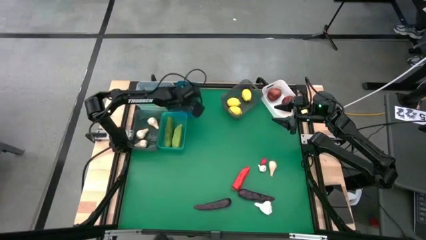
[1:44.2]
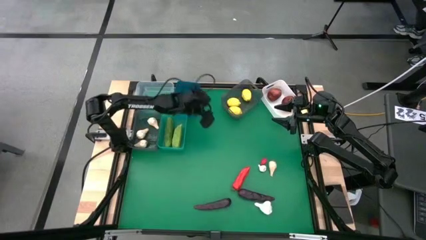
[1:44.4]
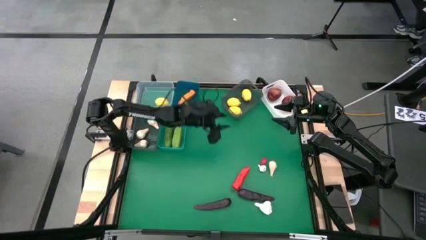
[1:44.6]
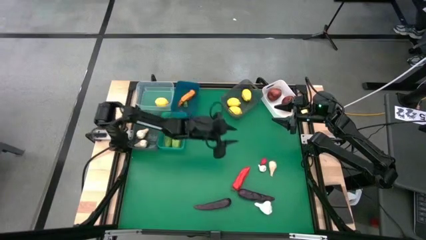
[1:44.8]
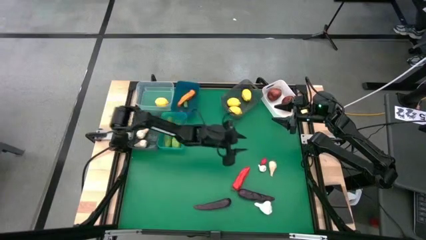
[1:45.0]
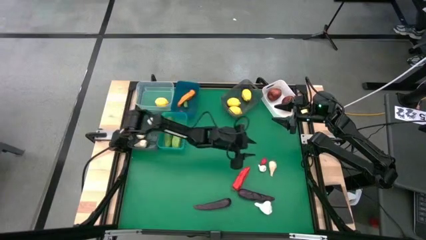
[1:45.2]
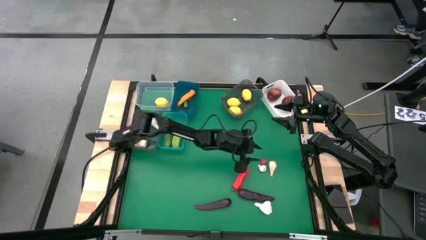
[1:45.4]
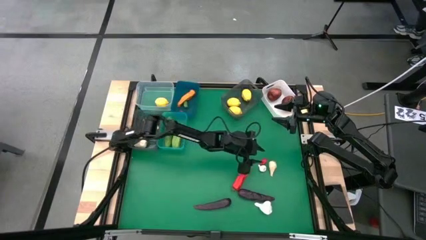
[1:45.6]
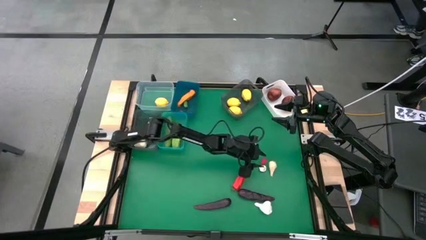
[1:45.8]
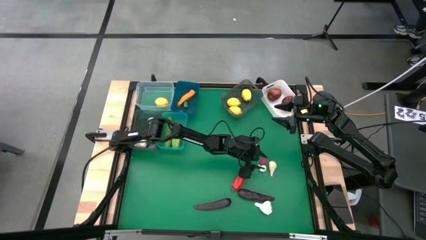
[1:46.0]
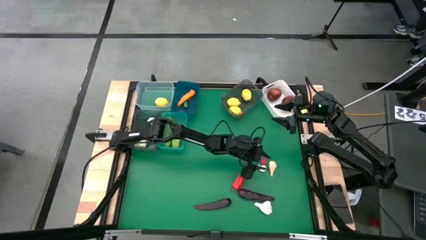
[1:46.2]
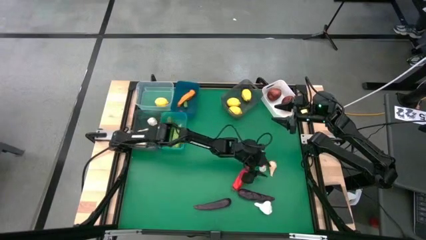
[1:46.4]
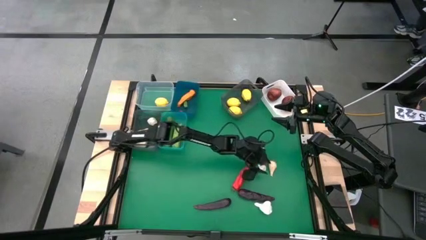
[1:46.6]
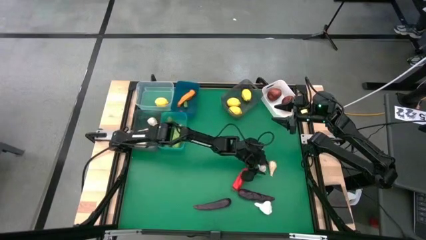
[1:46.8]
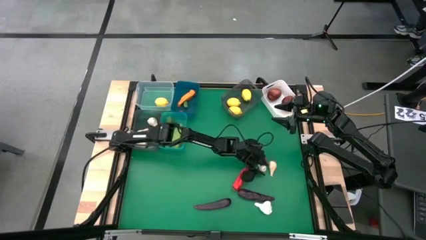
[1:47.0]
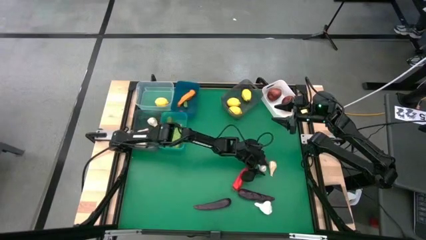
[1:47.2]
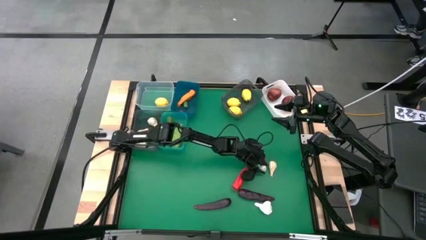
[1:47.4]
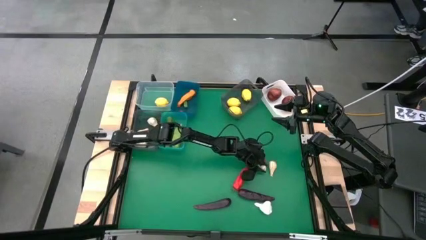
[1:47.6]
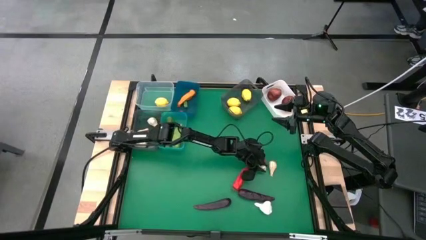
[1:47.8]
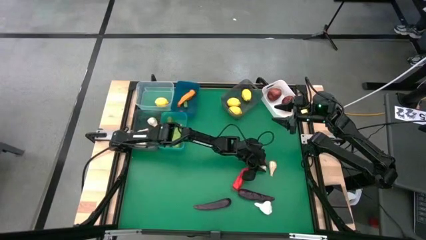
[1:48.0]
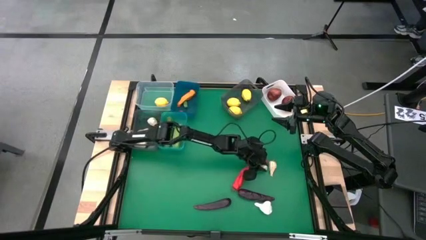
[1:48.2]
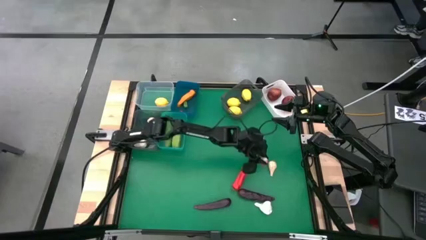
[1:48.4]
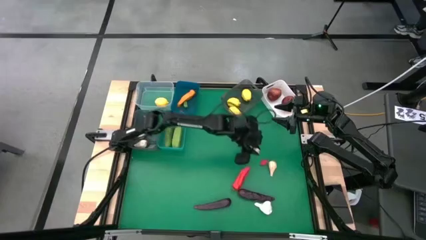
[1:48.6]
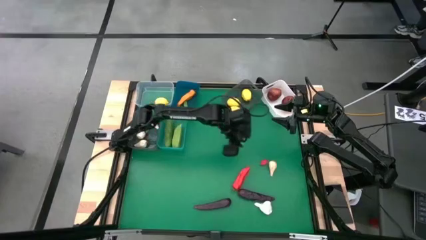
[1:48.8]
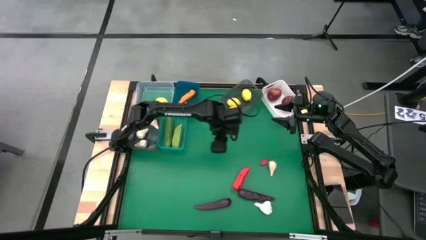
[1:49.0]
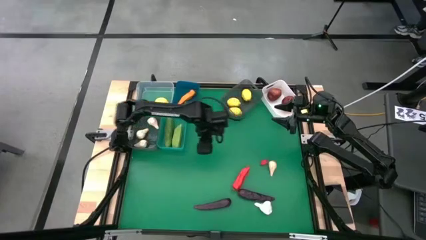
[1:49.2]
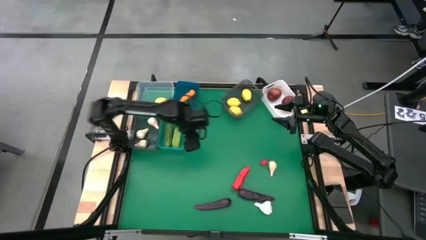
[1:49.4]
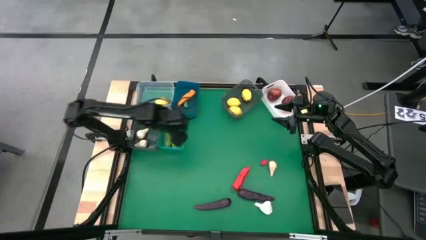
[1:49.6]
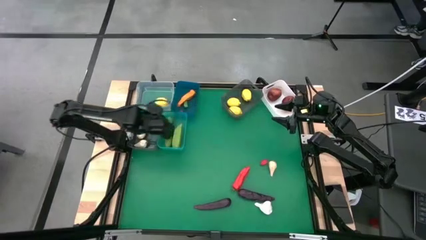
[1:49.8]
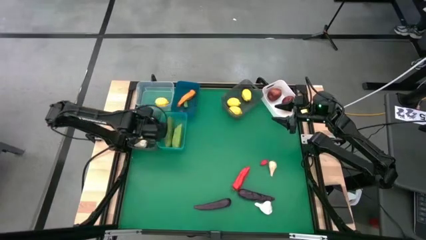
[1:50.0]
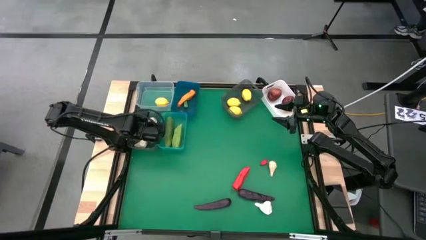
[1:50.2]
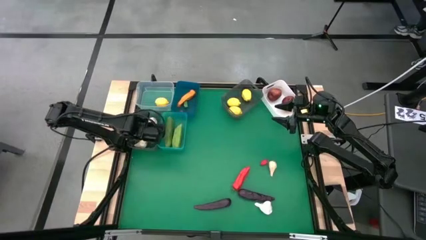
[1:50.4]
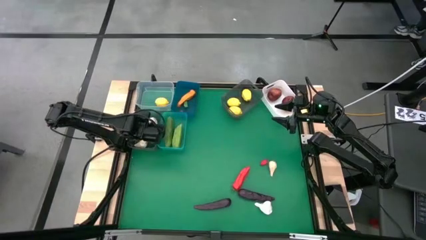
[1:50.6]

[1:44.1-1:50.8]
Task: Sort produce into baskets
Put the white garlic into the left black bin

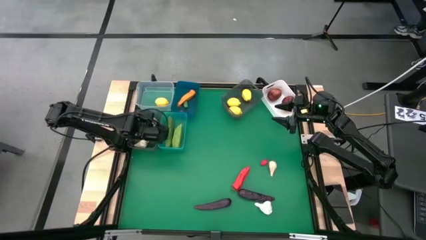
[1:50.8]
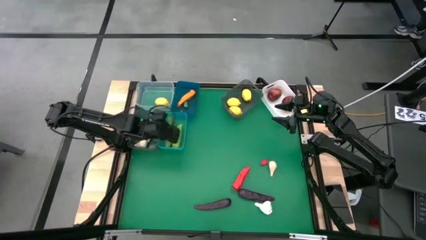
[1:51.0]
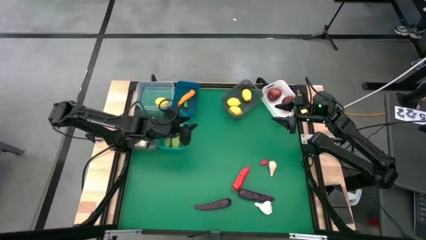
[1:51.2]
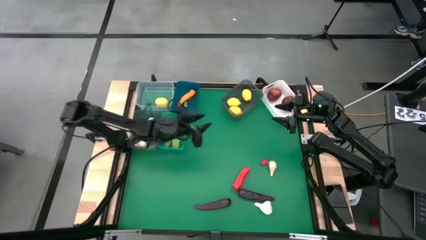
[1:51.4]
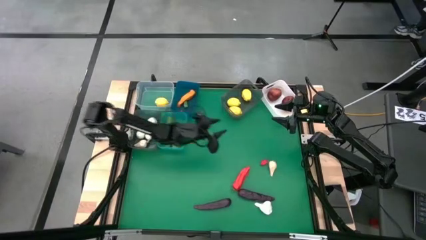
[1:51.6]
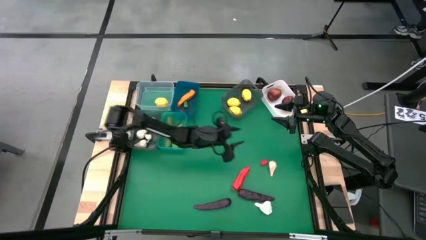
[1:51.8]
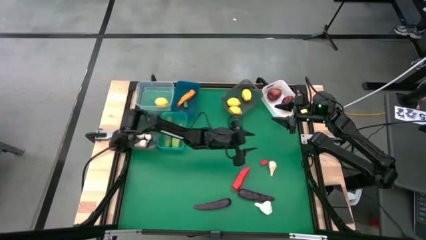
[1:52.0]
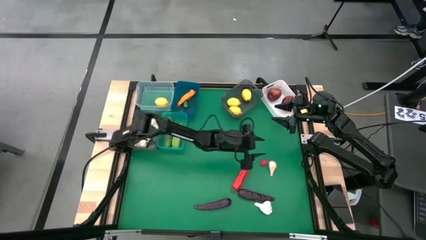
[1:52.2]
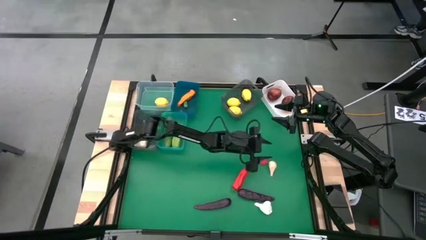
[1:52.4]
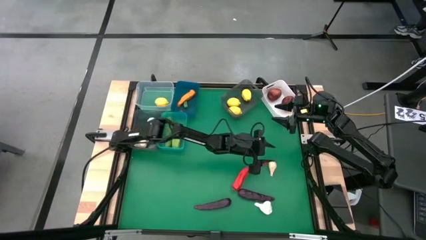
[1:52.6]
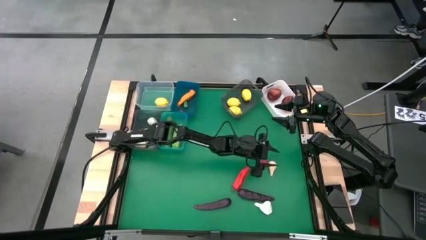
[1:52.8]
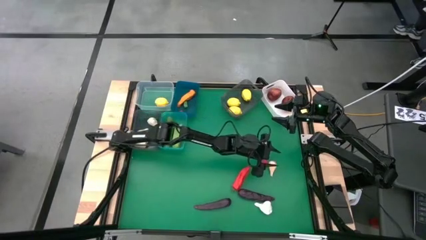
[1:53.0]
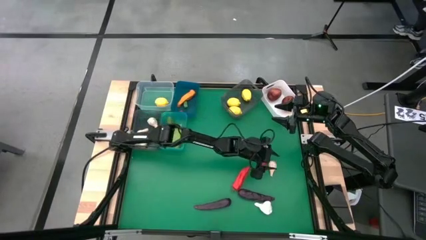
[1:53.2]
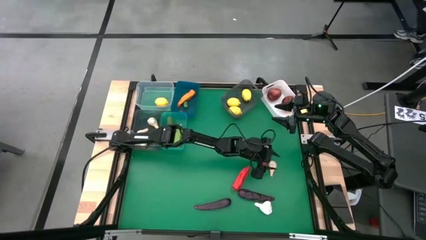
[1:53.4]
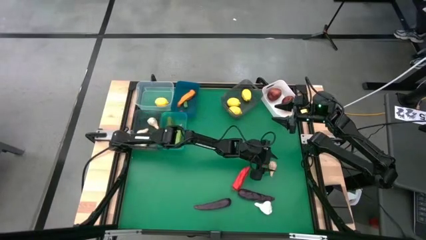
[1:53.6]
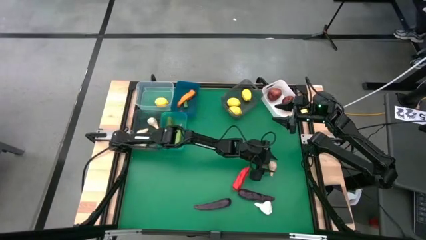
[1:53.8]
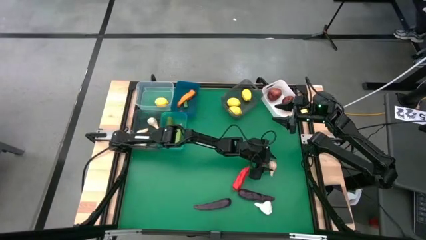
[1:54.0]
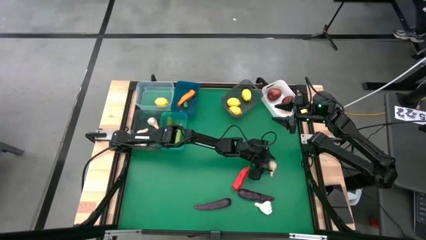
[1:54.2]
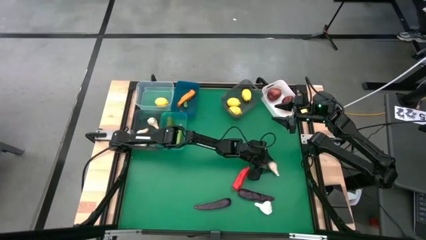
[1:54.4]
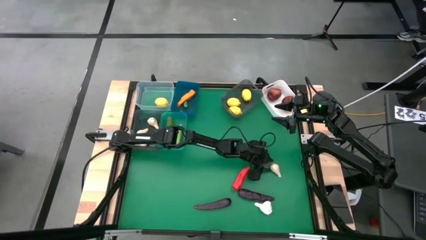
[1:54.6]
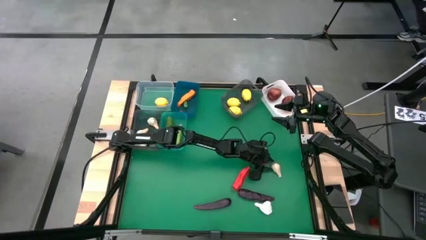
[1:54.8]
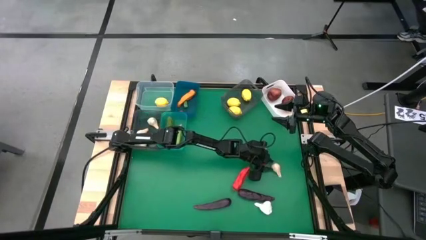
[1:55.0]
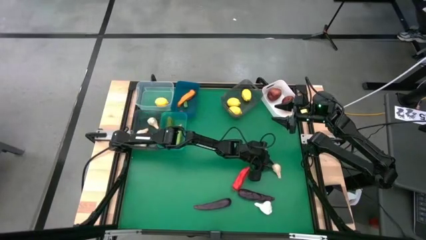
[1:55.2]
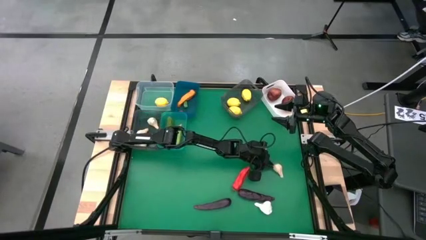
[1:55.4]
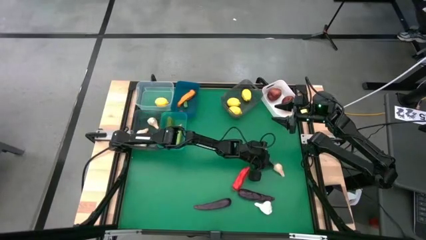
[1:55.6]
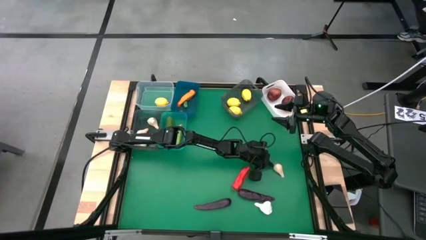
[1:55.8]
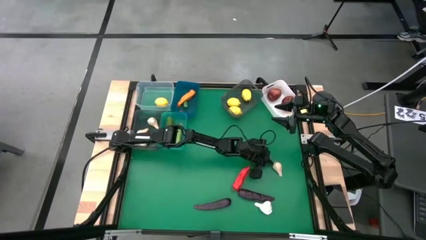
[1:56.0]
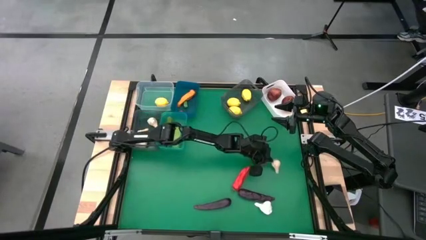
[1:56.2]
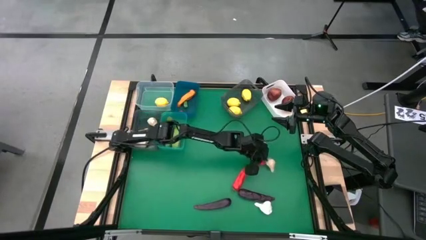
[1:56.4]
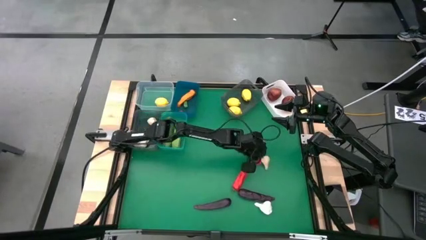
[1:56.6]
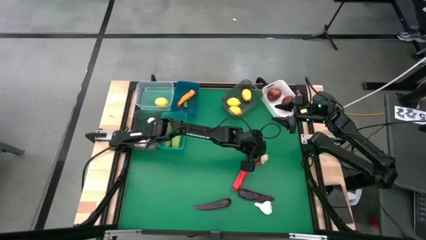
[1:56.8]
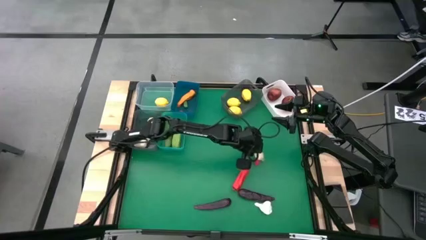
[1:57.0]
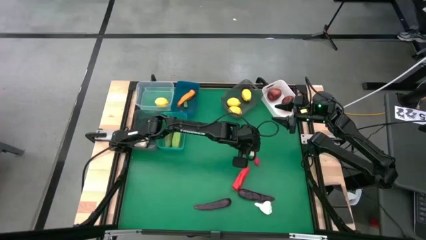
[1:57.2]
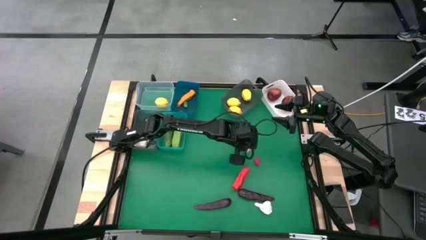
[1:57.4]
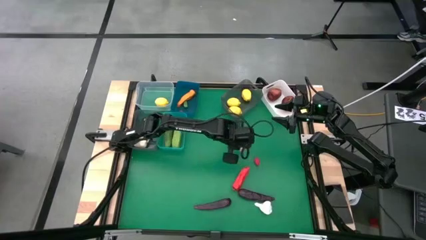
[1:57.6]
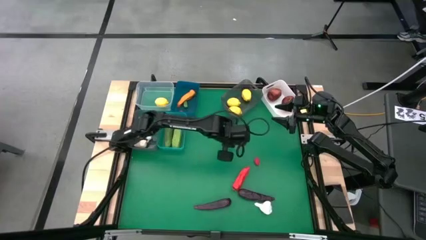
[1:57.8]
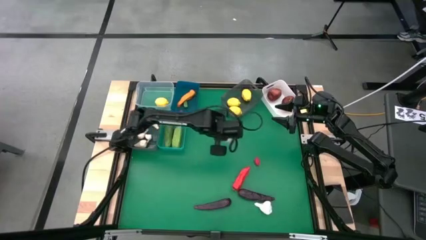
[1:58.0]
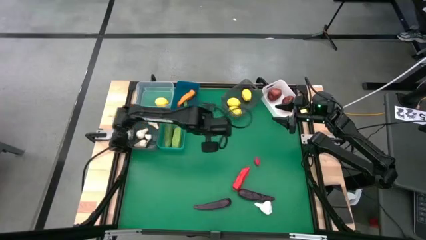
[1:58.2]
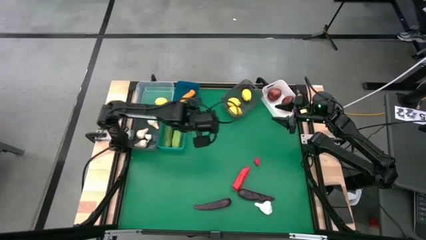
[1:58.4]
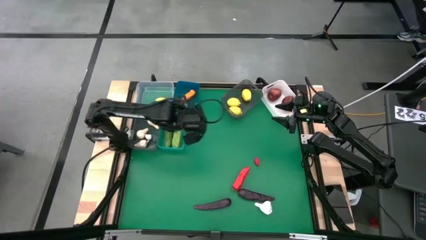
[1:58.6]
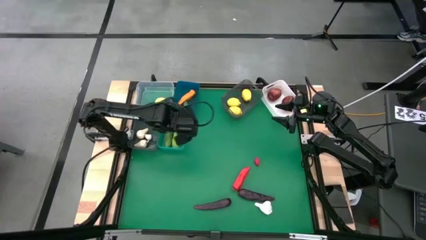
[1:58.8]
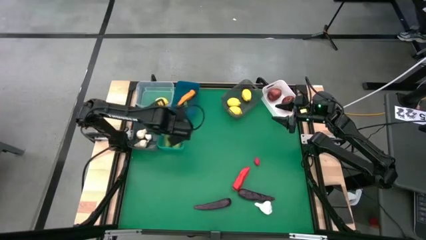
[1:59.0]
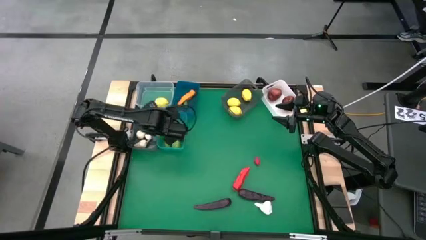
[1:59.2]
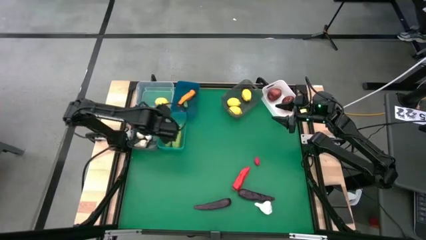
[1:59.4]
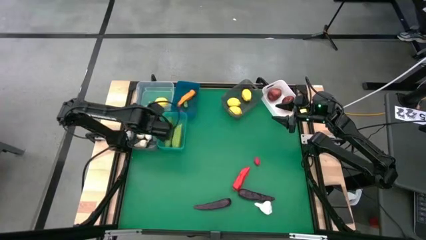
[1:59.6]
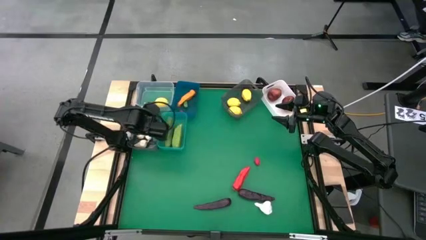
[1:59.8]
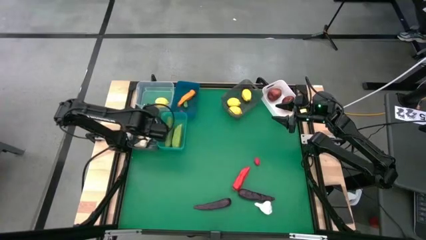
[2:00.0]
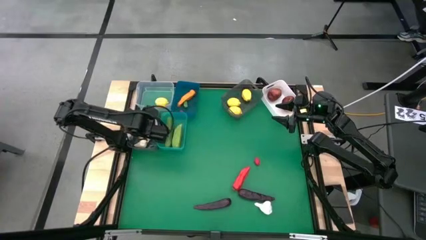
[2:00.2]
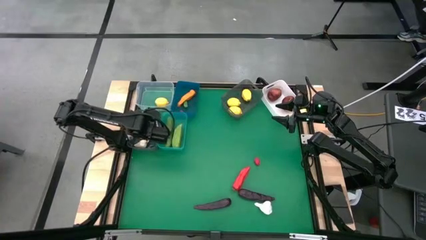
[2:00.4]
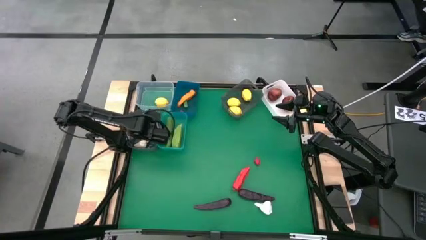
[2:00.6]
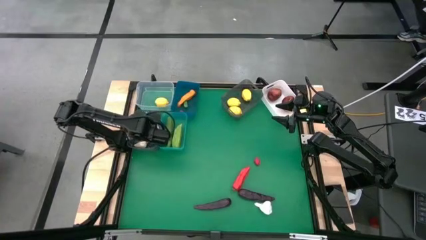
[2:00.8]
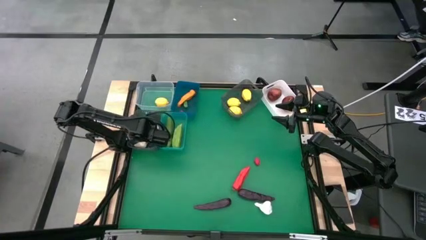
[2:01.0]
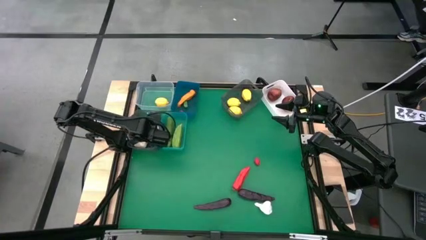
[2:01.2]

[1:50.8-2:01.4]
Put the white garlic into the left black bin
